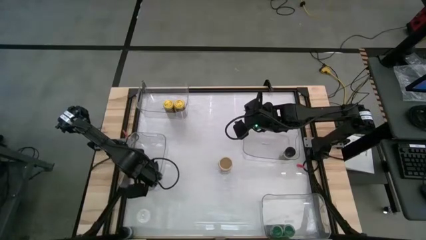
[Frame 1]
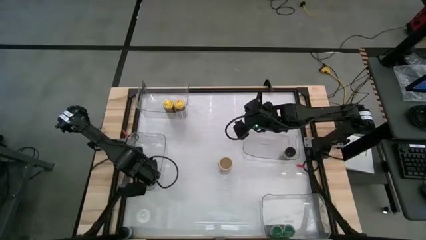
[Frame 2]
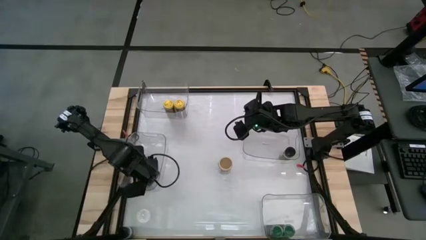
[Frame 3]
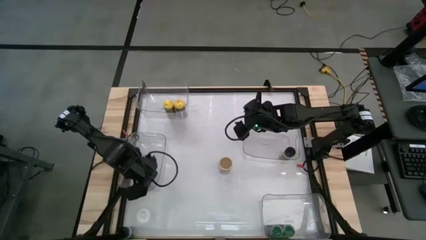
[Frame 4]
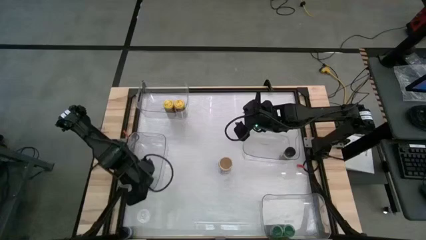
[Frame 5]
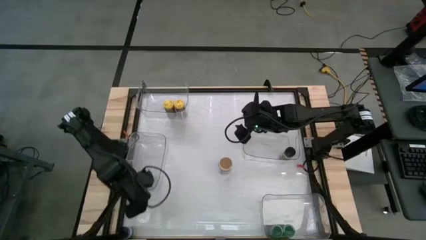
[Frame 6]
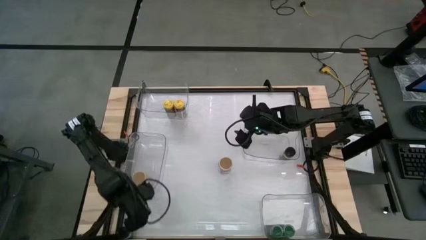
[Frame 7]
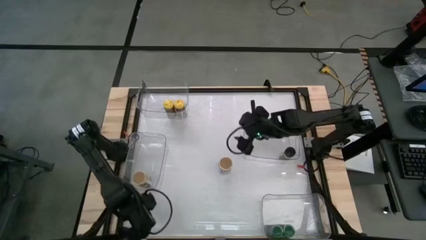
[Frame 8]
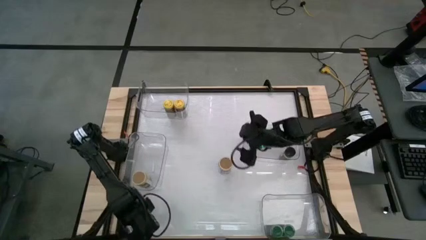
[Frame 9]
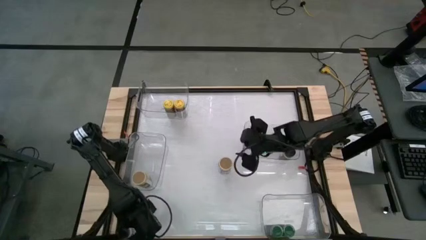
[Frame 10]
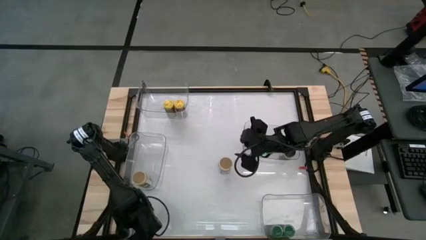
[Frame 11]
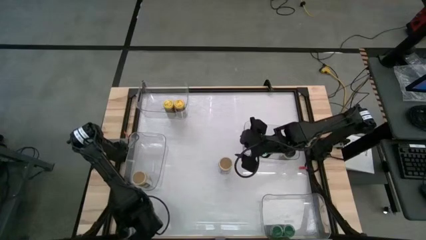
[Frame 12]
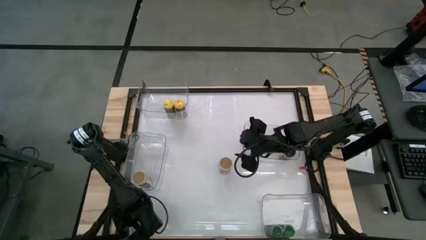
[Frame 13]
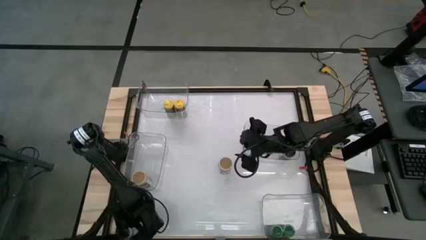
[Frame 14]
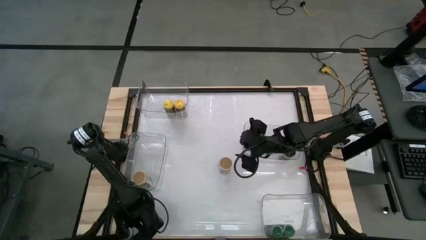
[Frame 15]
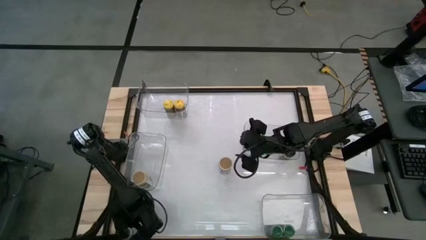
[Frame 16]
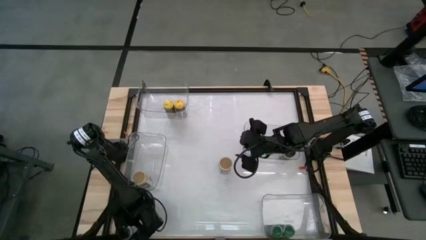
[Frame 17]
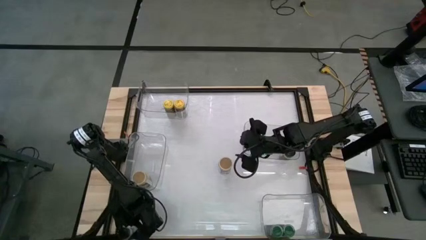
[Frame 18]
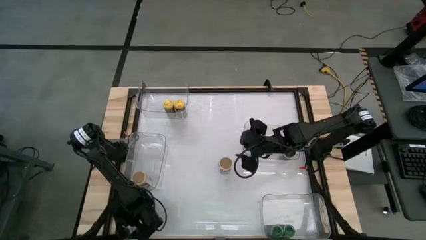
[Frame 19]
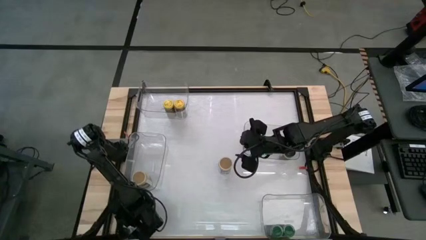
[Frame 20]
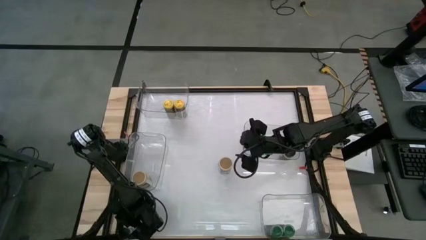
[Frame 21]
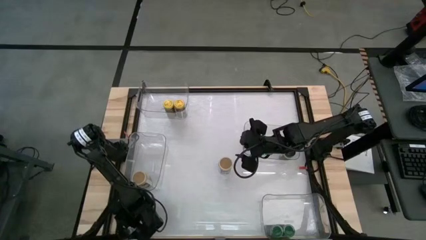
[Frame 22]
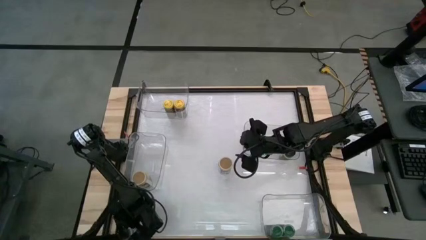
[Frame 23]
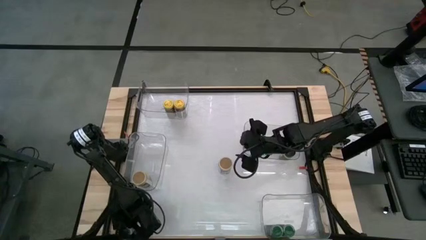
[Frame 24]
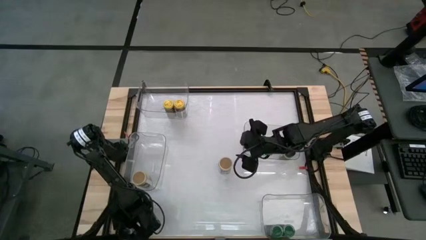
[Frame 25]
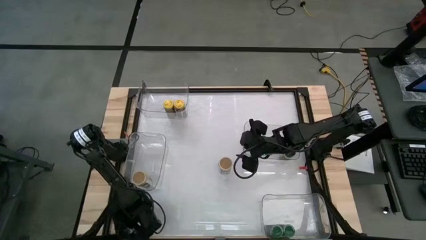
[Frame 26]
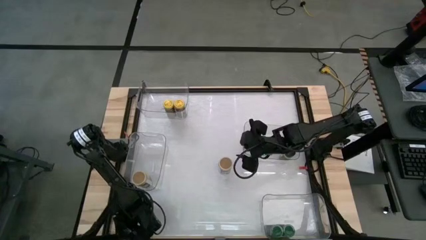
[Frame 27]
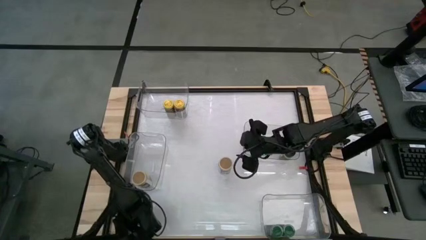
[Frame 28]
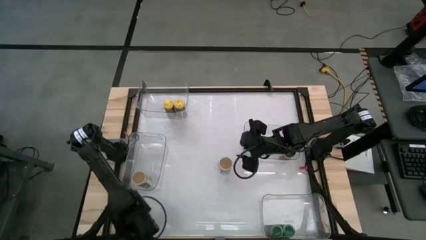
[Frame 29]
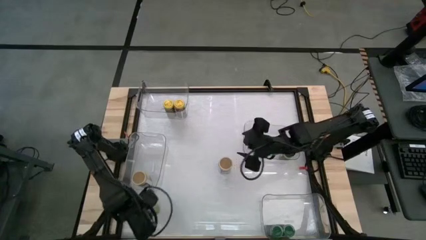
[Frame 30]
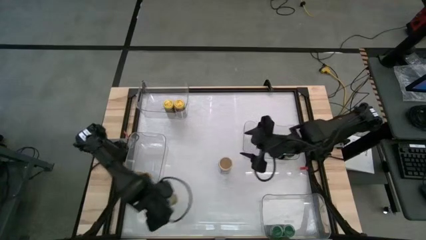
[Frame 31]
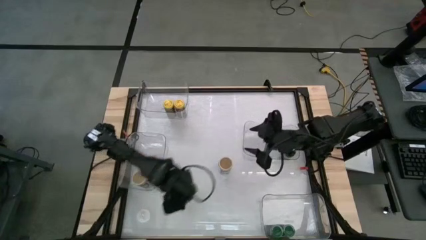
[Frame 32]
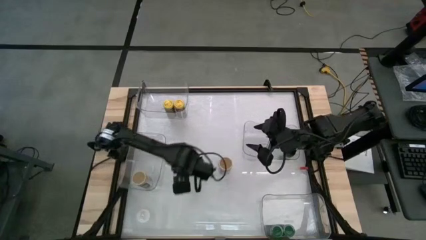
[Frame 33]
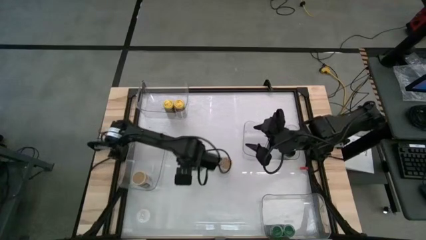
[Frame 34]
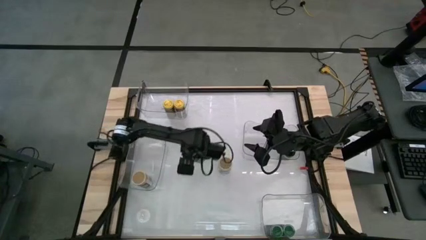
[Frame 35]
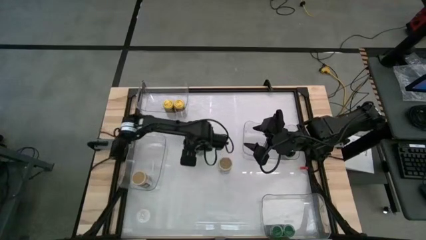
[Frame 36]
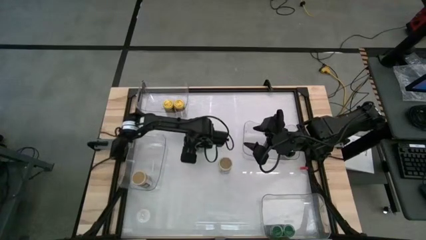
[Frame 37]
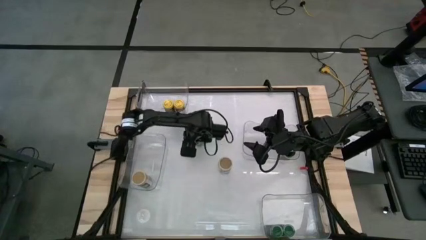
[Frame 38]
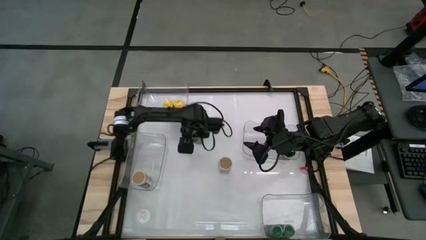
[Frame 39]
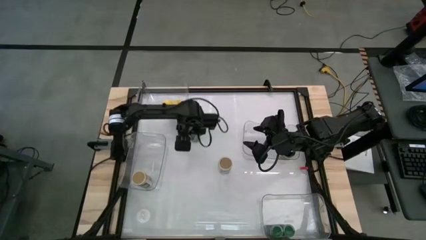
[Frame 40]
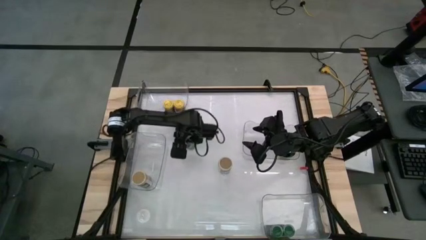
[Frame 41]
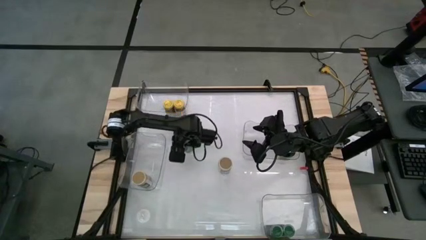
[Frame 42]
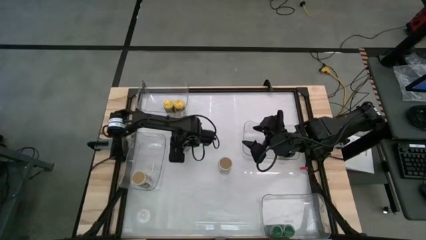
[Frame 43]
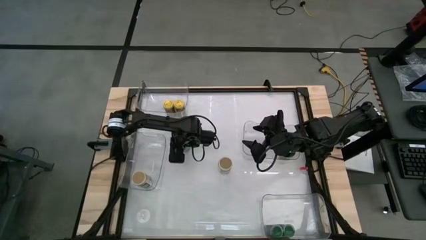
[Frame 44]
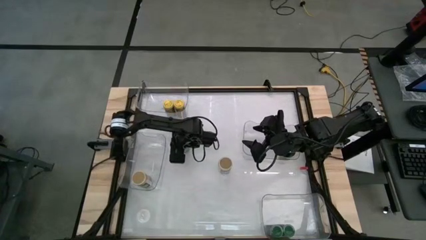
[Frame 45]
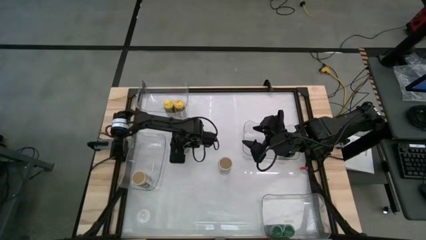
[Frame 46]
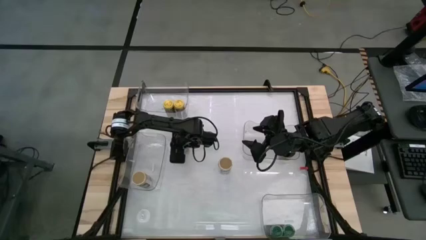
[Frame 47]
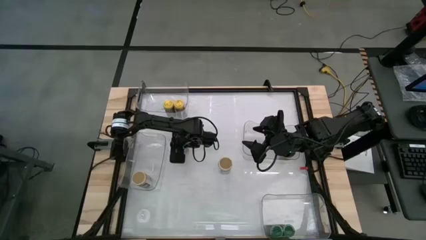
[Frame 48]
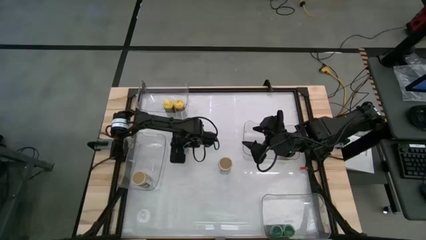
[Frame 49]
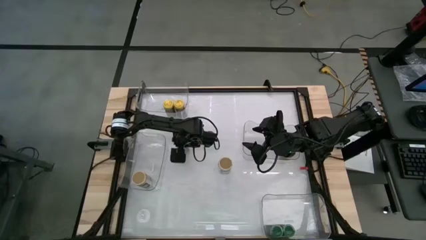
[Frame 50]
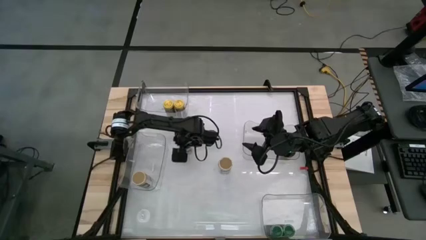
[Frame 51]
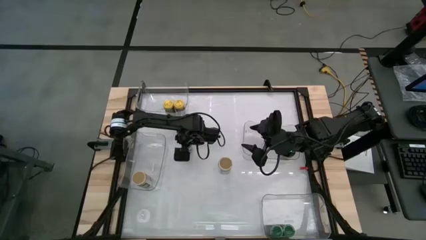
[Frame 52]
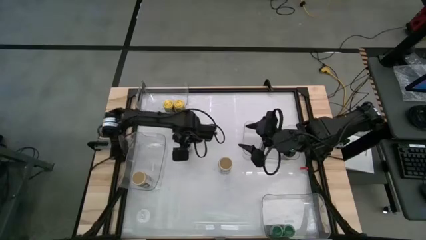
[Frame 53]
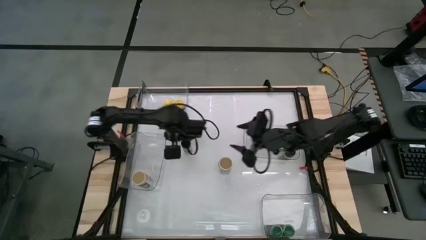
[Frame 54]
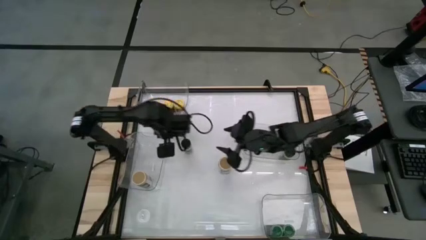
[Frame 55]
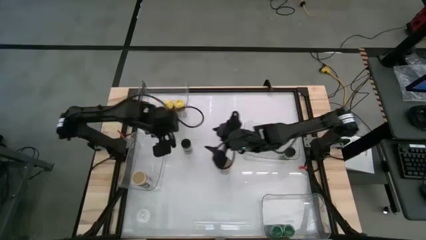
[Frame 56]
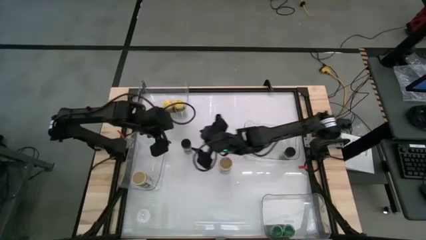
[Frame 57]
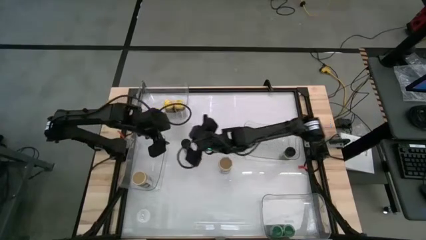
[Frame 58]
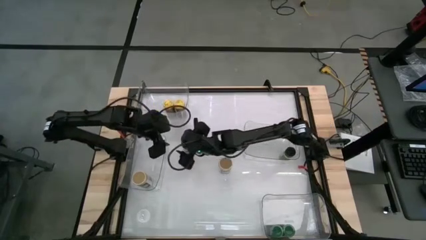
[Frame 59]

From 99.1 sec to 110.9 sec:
Task: Sort spices by type
Put the black seasoning bottle into the middle right transparent bin
